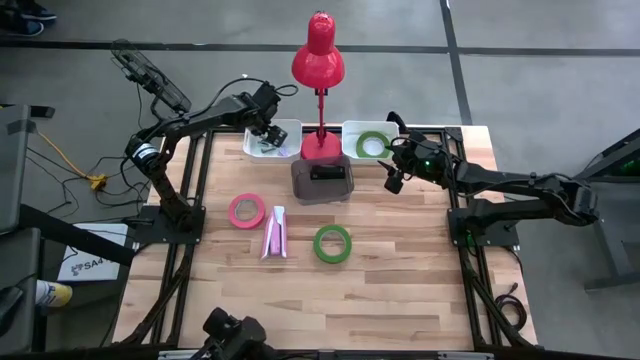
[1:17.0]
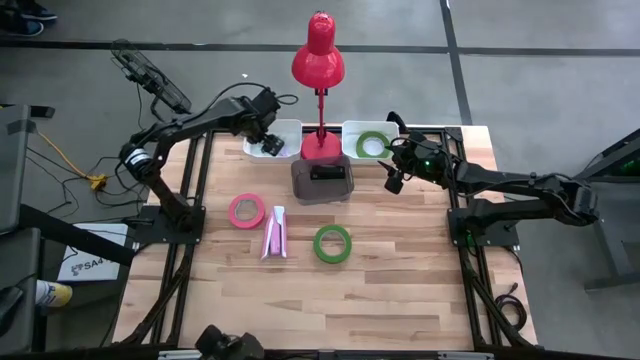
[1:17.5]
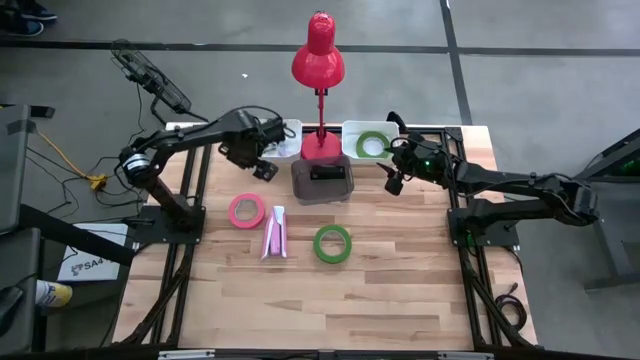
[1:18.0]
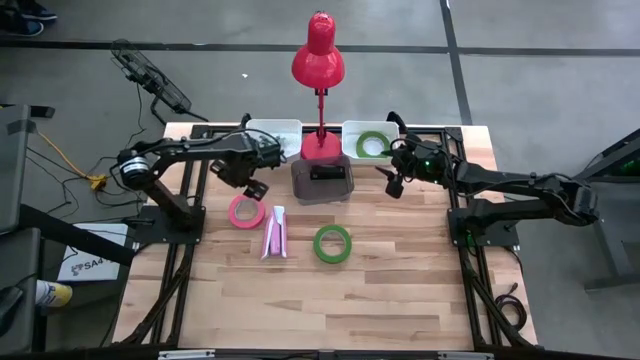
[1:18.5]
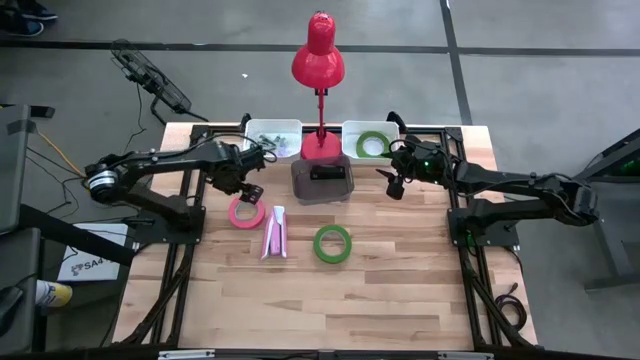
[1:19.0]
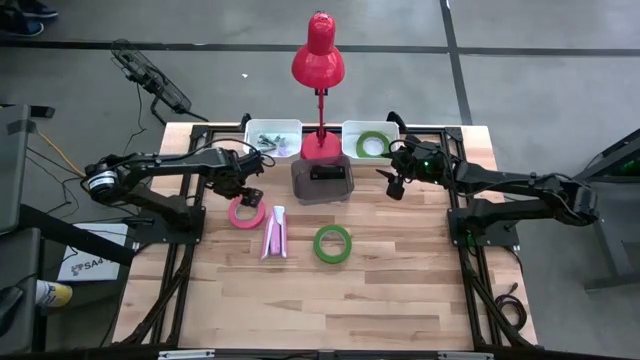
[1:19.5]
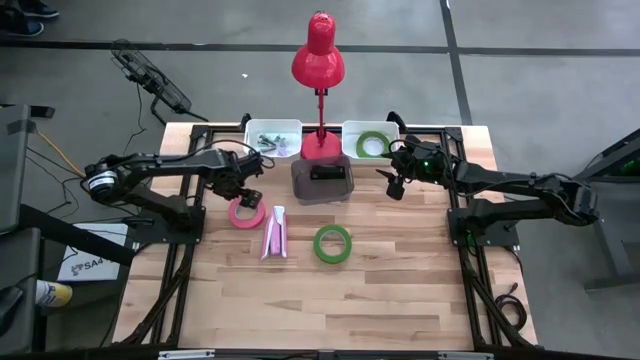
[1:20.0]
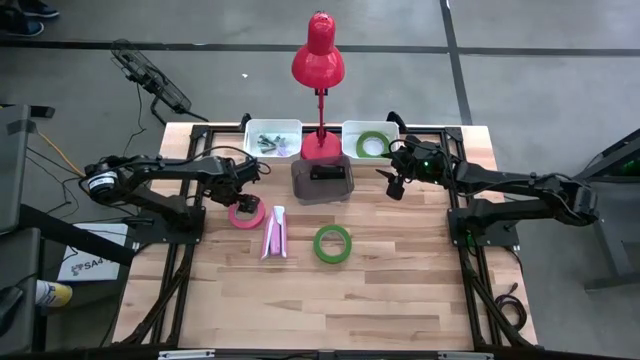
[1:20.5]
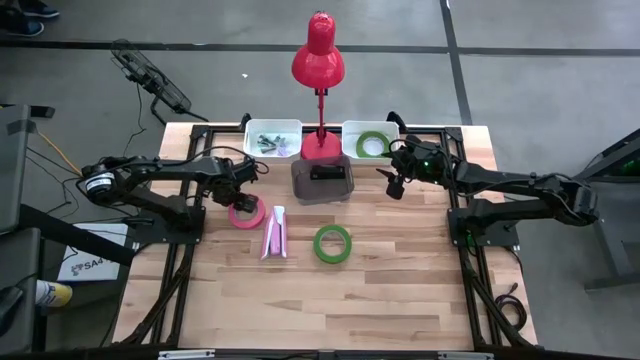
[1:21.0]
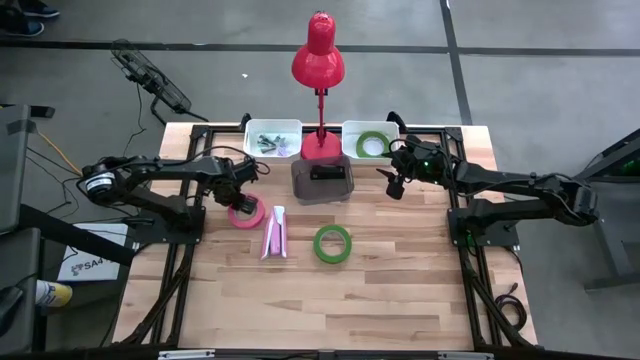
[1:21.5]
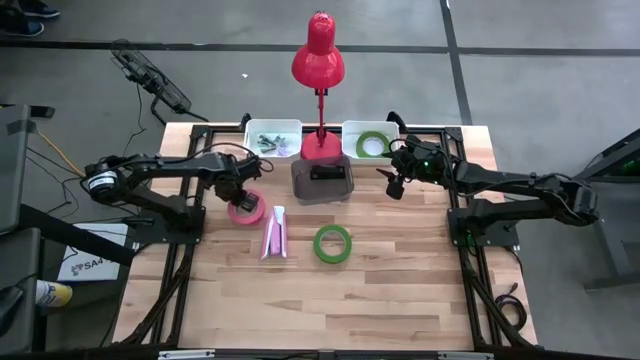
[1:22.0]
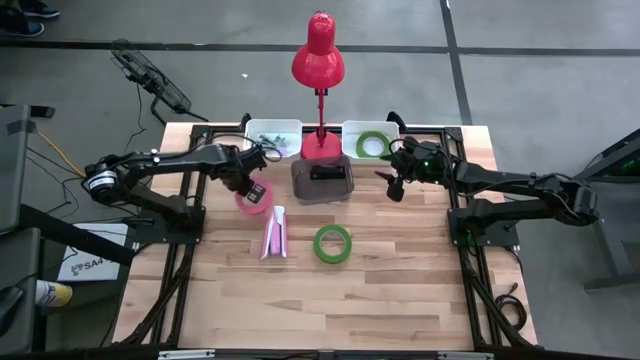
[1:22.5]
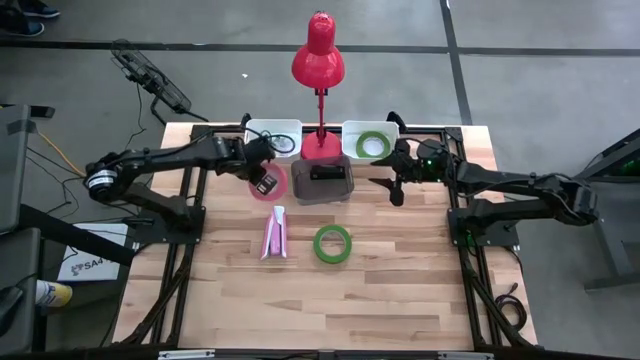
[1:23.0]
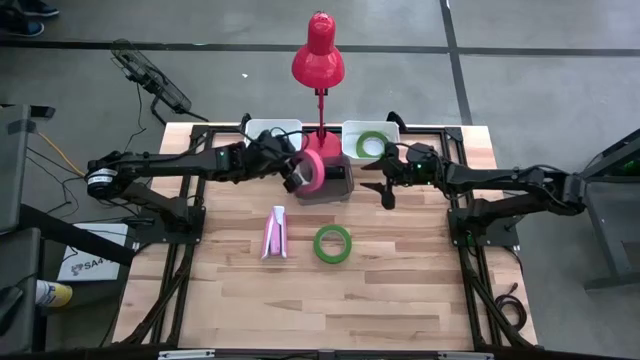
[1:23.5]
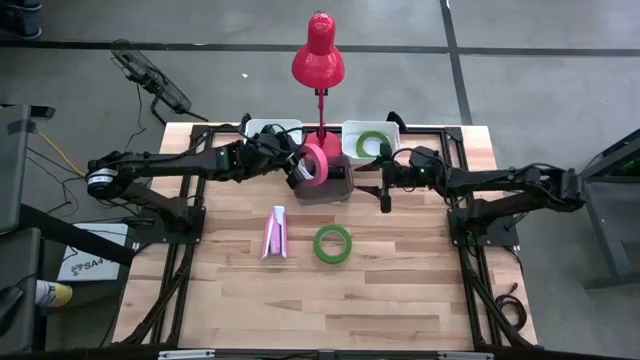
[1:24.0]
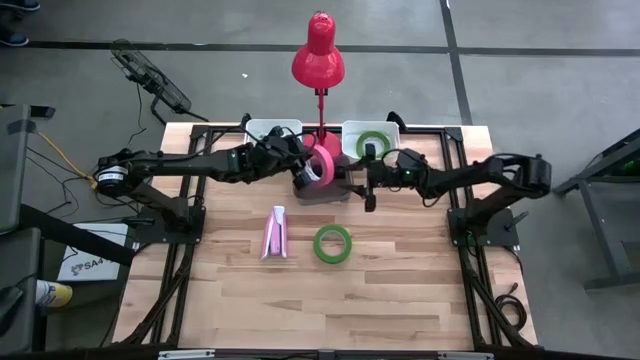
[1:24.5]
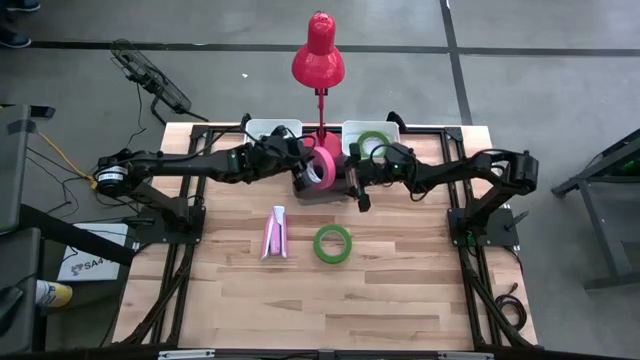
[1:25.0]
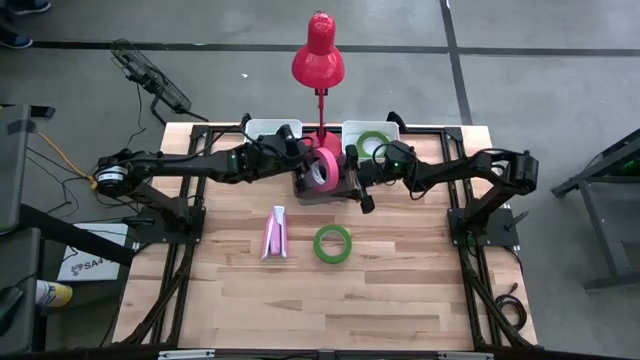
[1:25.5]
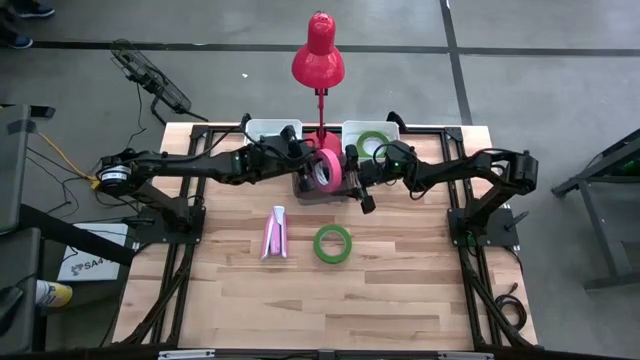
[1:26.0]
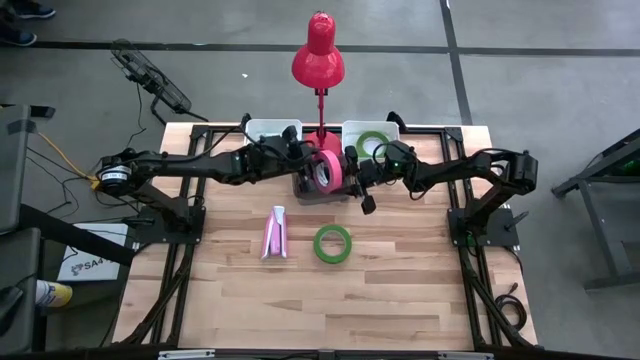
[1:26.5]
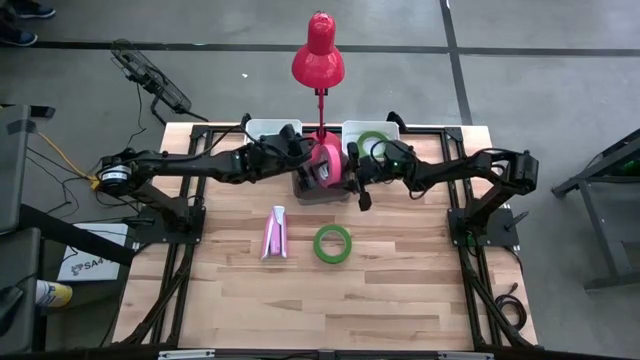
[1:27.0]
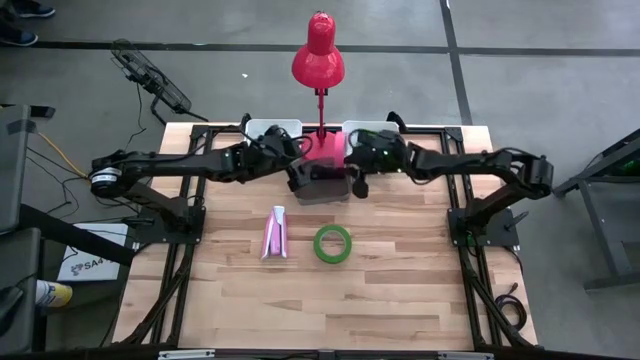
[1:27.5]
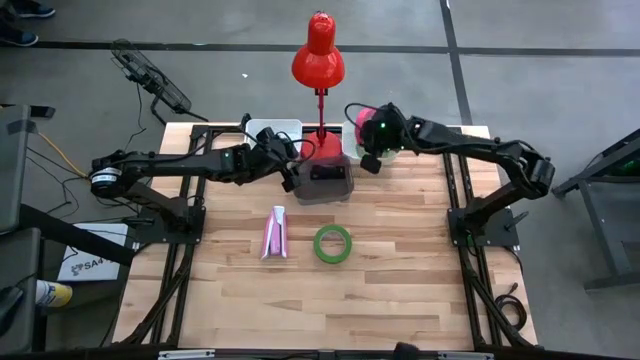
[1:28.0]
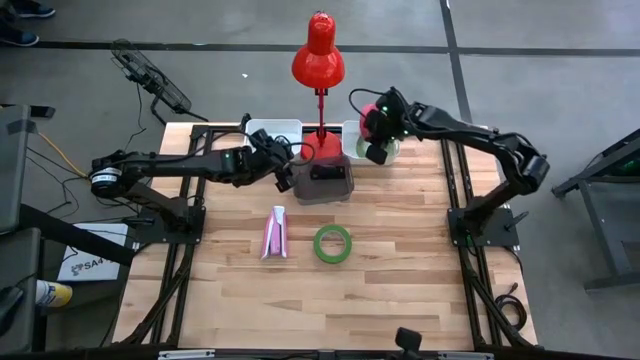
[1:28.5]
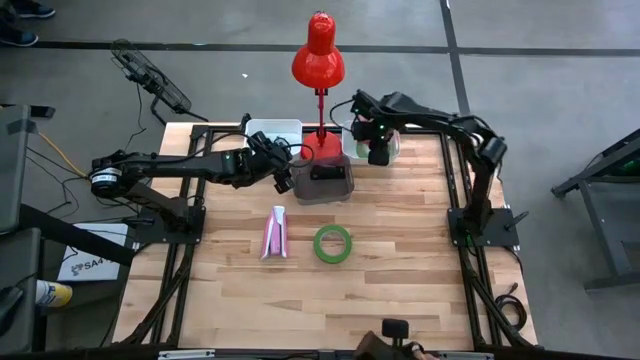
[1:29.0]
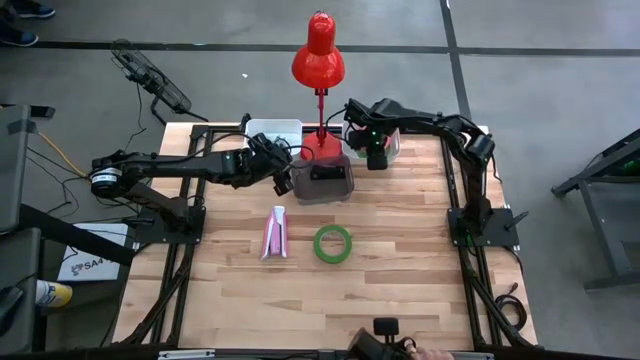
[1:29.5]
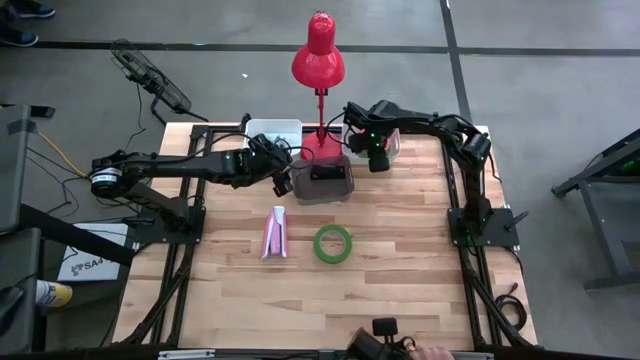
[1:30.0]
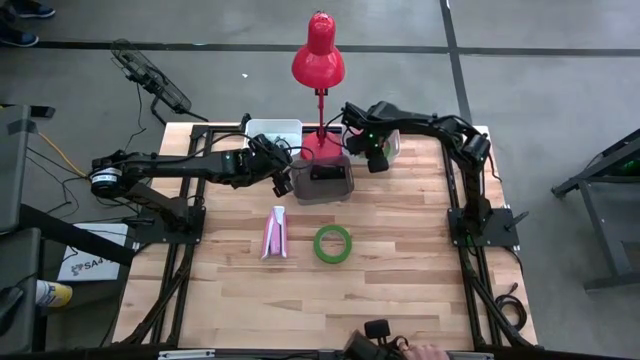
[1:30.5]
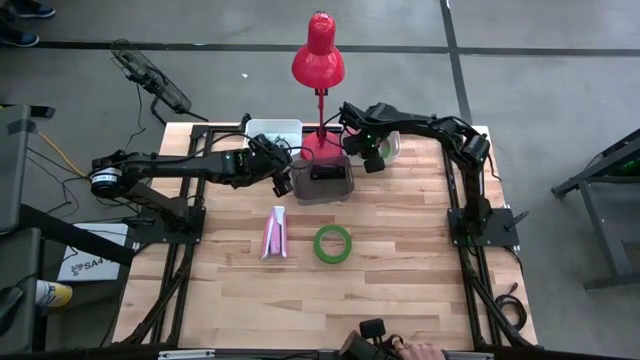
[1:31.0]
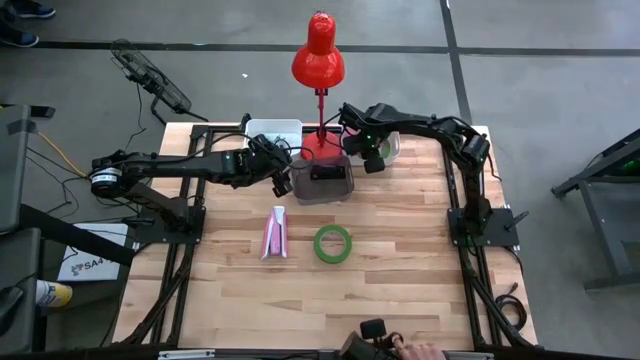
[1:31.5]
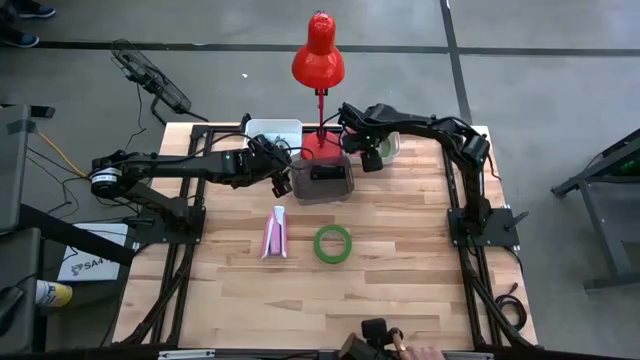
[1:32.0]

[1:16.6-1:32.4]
Task: Pick and place Stapler, Stapler remover, tape
Put the pink tape into the right white bin

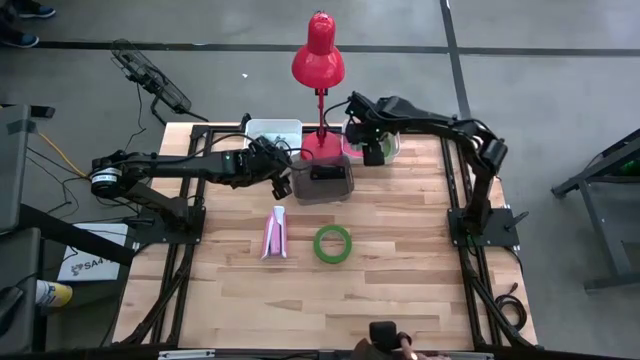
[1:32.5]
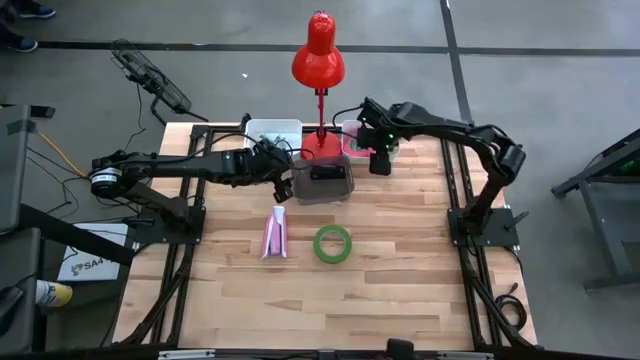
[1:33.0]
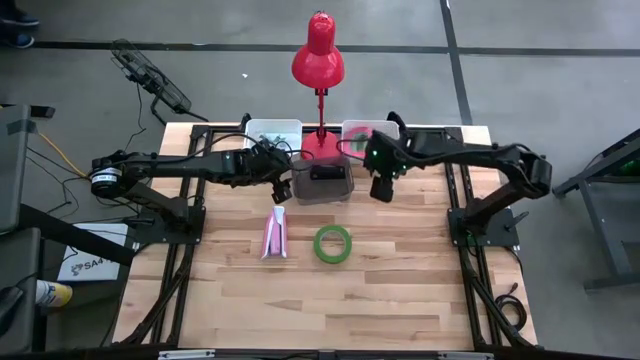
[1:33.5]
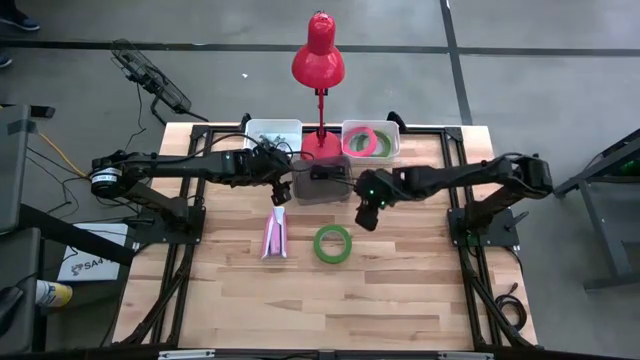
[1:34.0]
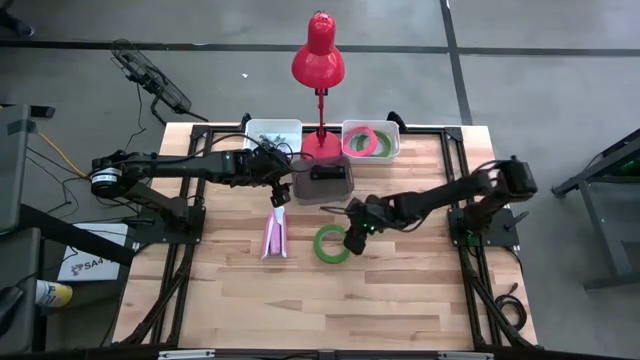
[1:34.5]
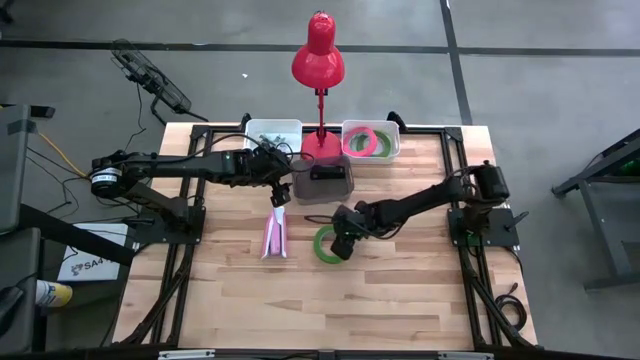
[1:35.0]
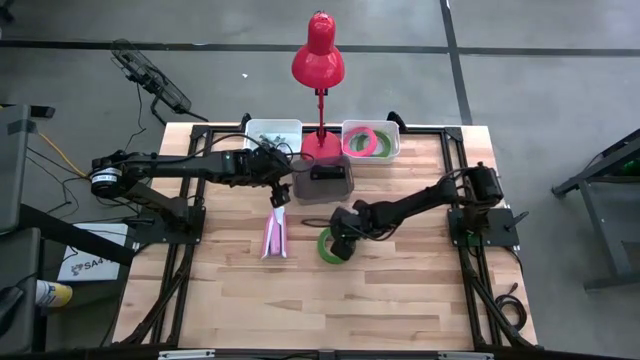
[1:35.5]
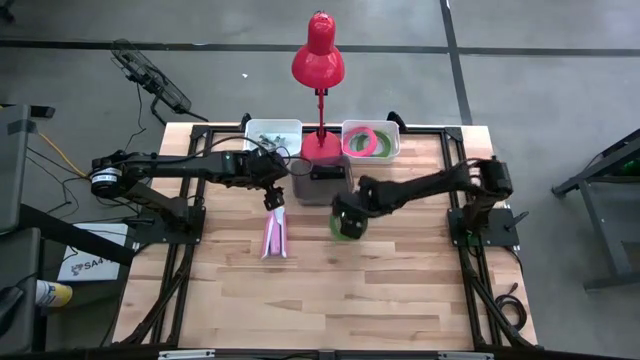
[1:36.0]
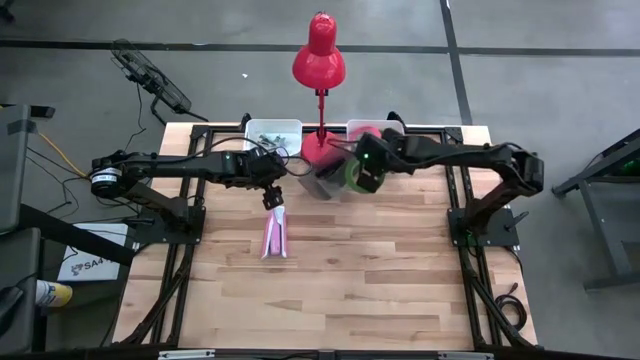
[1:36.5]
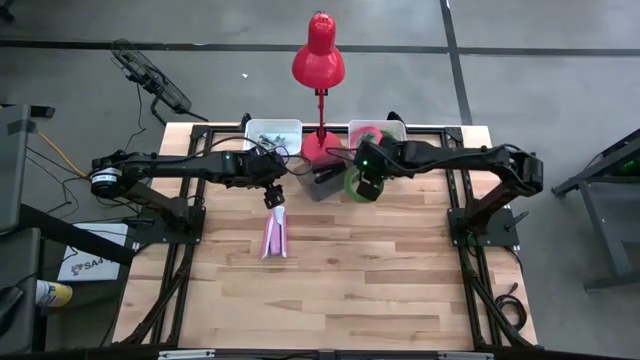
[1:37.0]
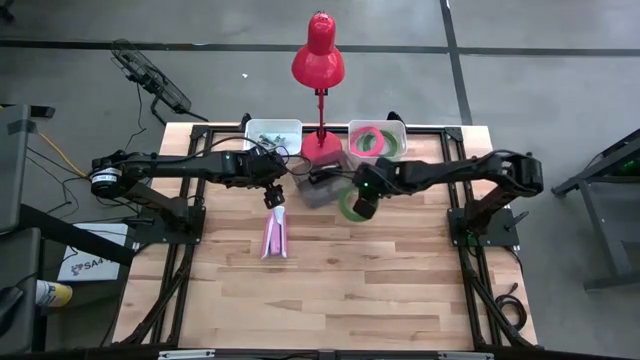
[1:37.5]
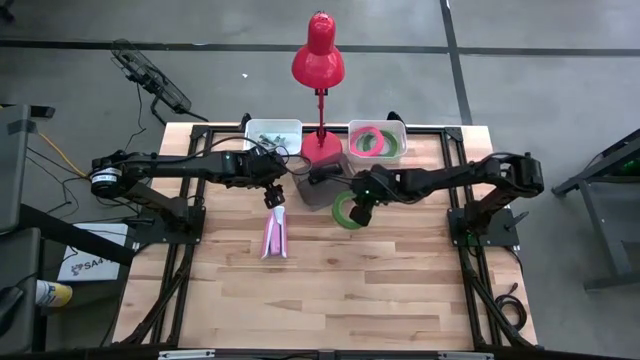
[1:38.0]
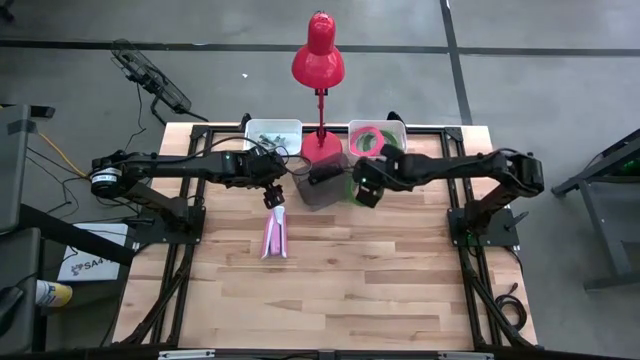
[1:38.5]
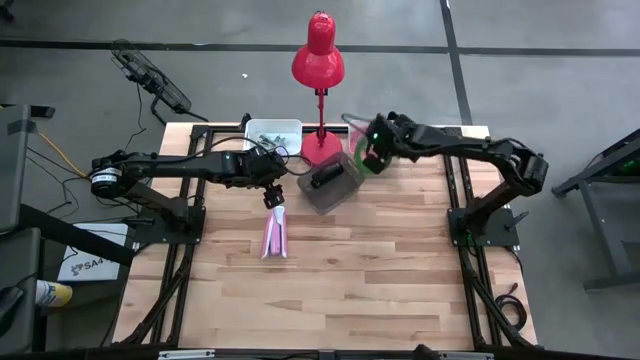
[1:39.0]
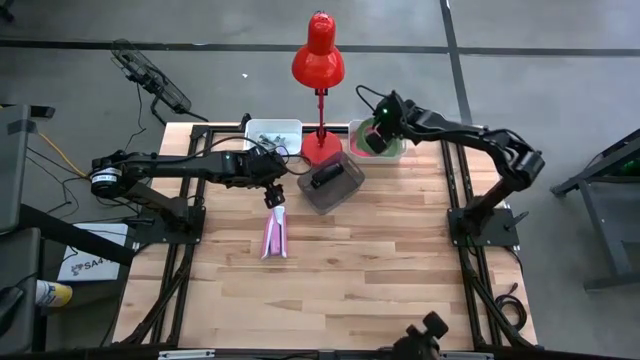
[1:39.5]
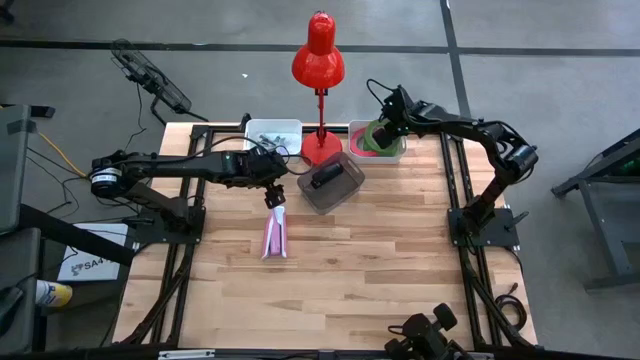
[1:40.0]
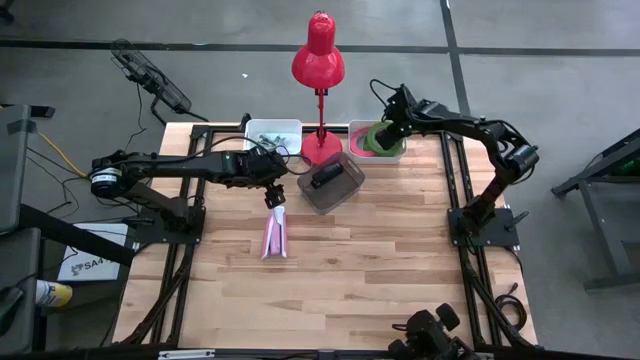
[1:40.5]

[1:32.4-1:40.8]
Put the green tape into the right white bin
